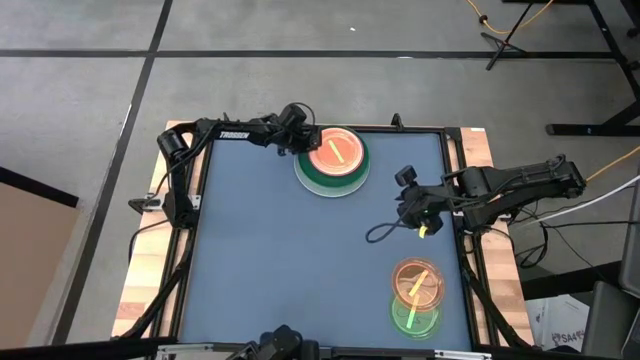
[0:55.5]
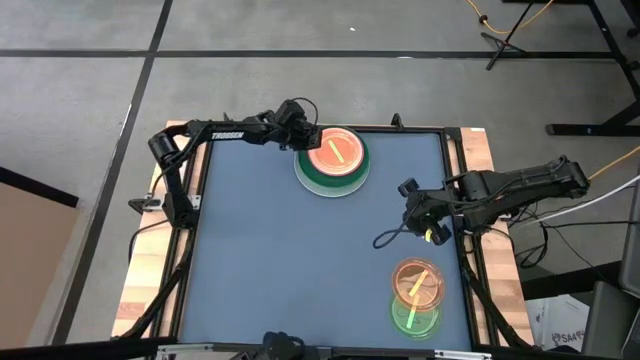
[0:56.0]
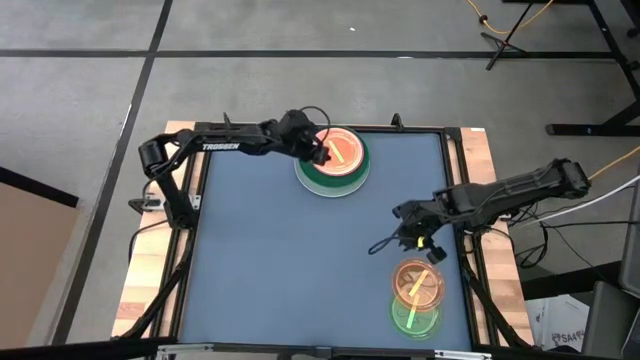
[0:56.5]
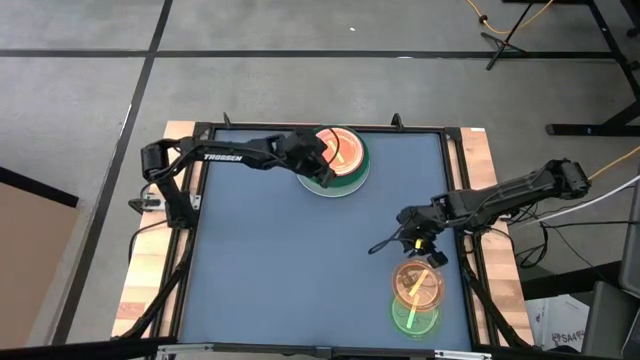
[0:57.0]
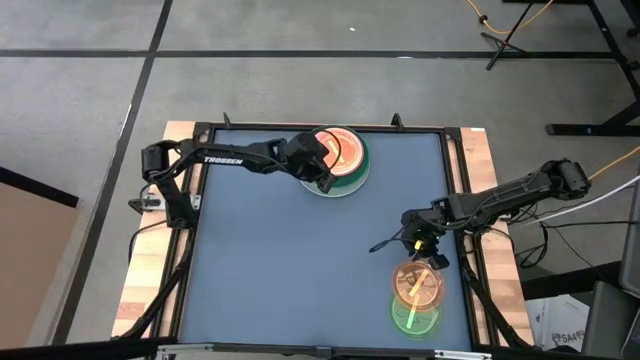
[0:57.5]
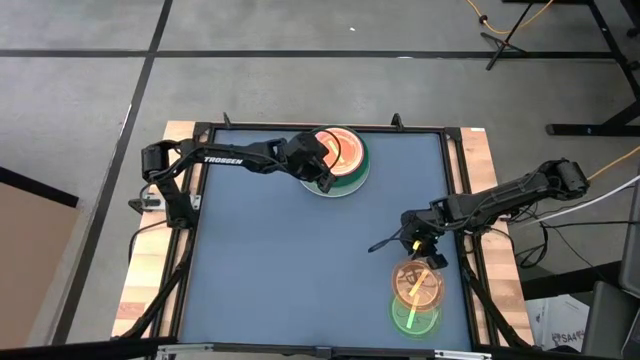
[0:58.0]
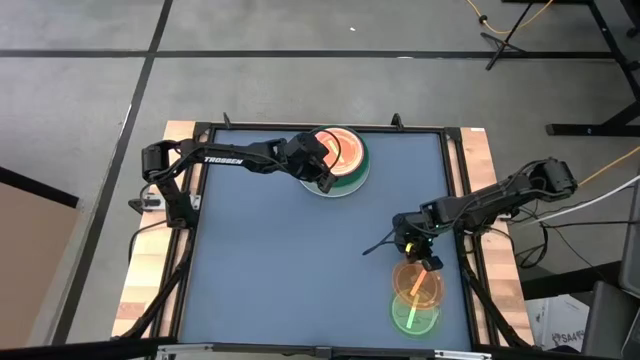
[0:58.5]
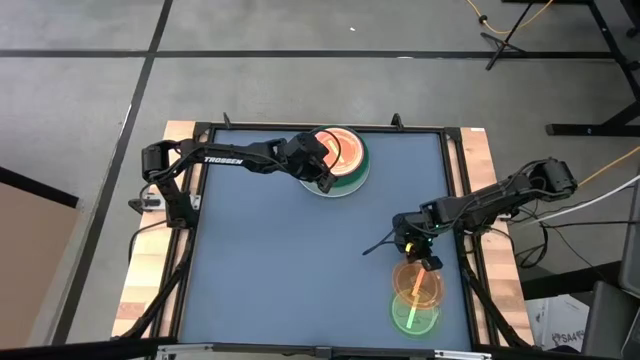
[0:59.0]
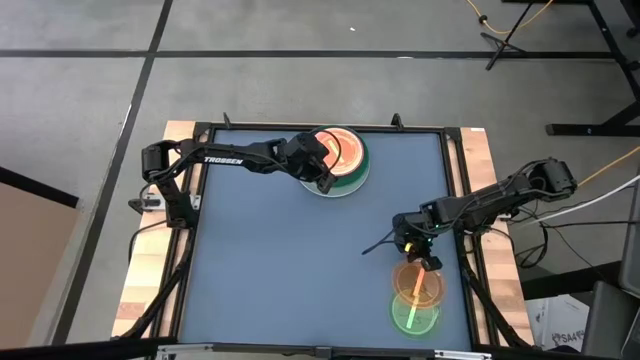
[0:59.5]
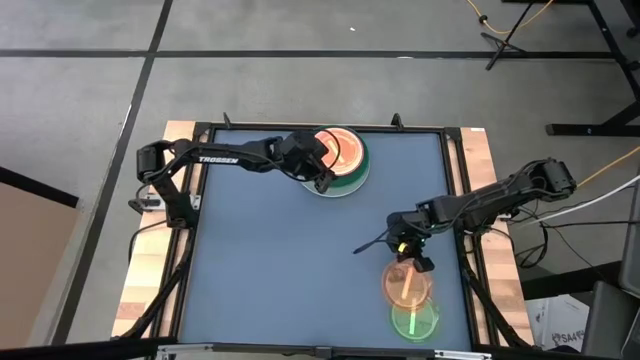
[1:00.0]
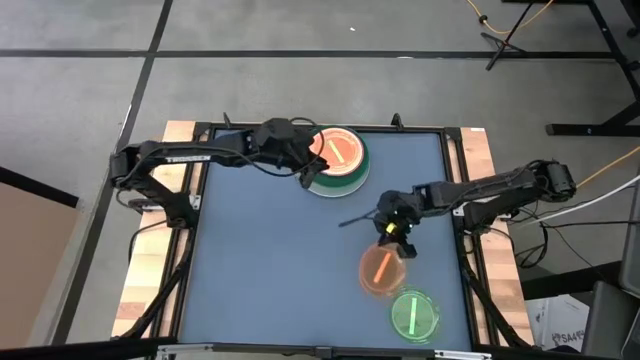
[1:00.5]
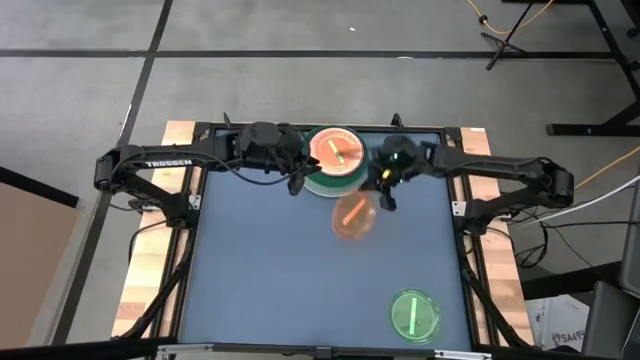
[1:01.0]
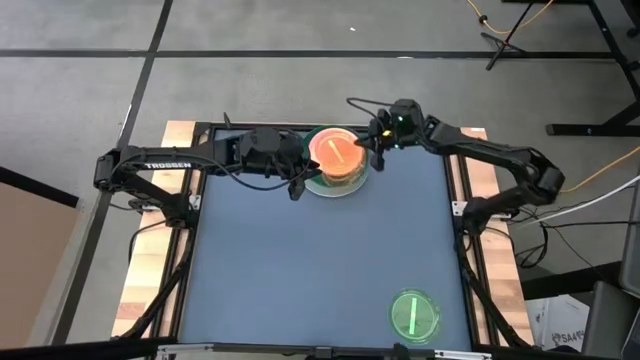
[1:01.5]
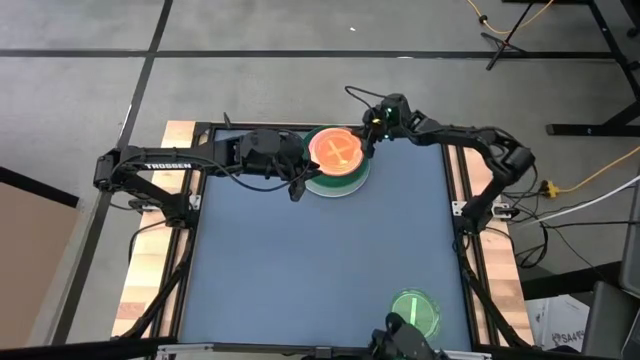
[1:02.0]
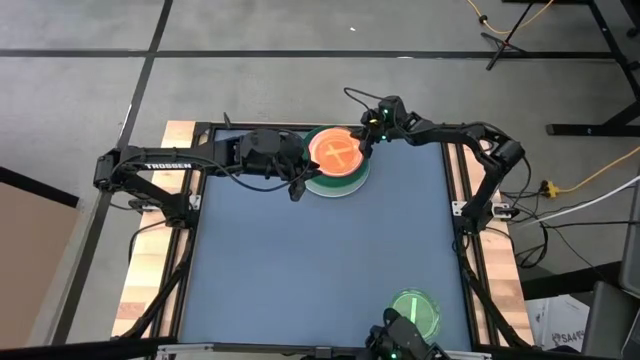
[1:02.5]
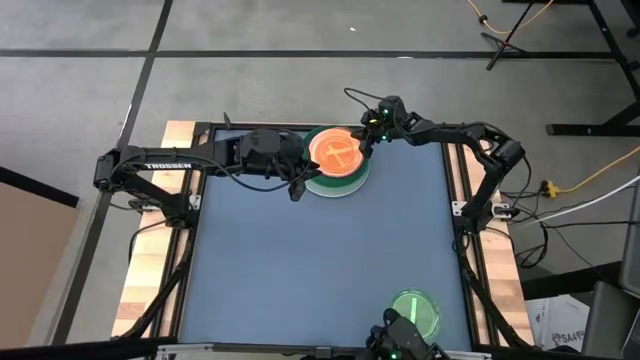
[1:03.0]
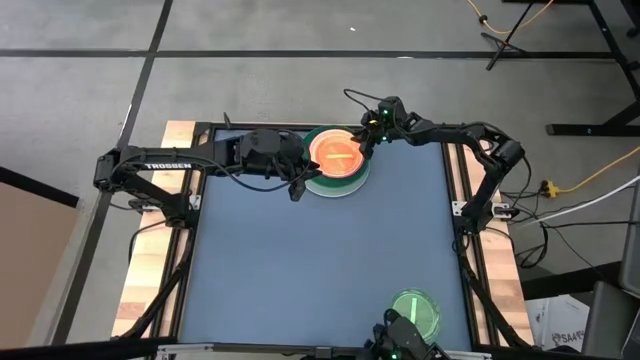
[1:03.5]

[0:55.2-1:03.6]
Task: Stack plastic plates
Stack the orange plate on top of the light green plate

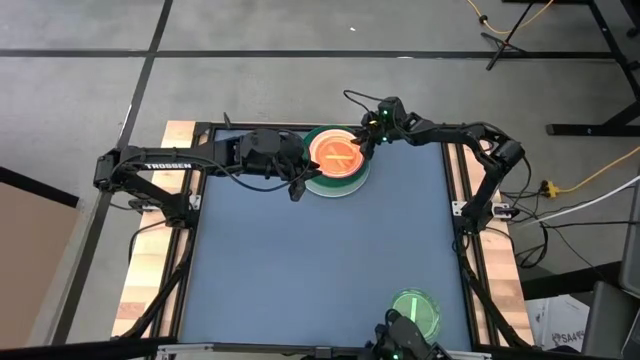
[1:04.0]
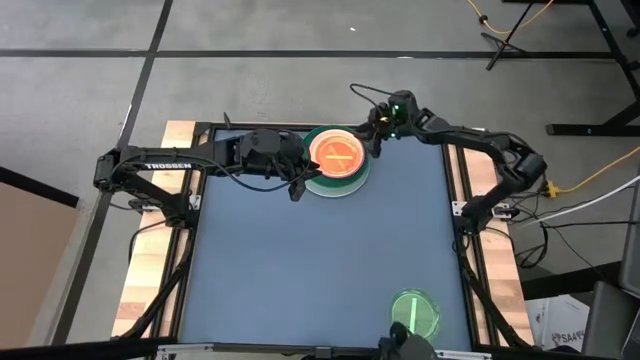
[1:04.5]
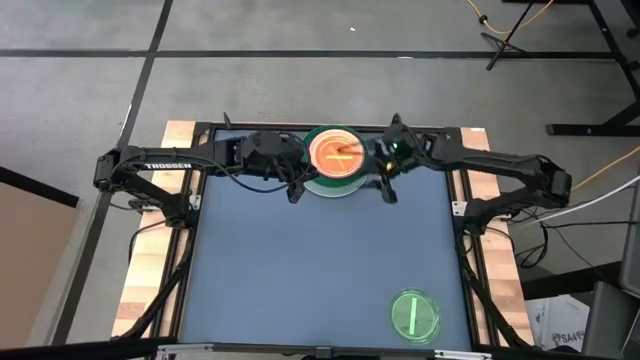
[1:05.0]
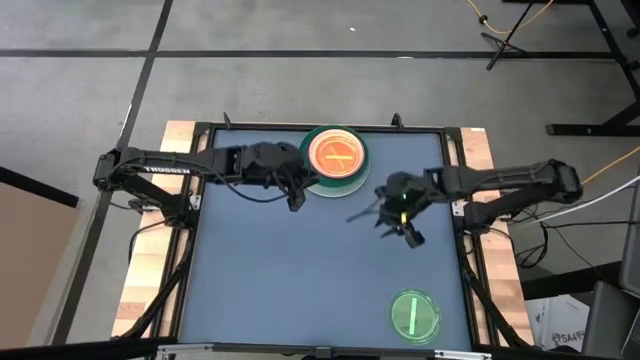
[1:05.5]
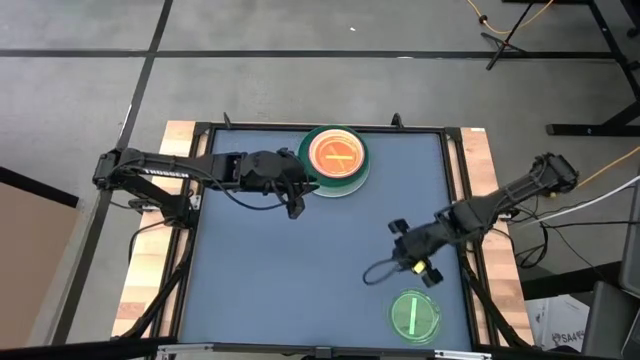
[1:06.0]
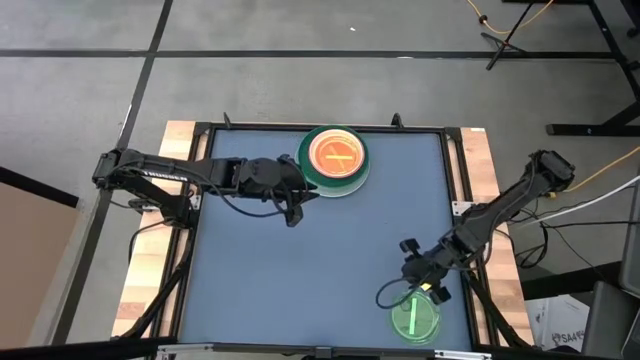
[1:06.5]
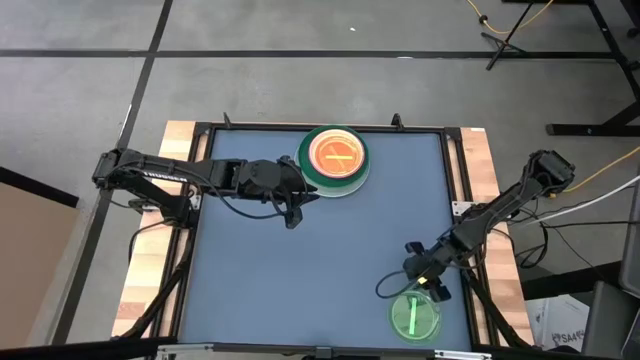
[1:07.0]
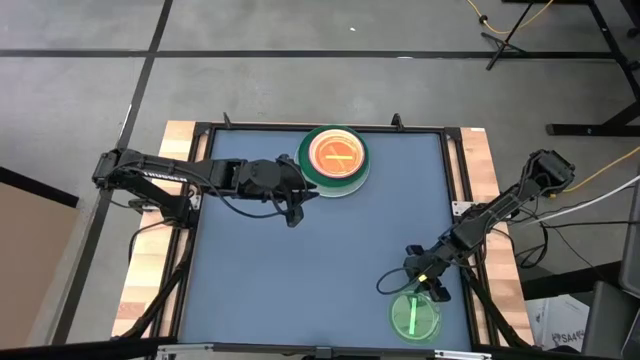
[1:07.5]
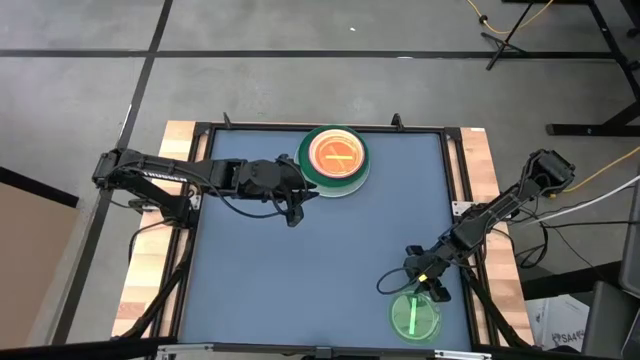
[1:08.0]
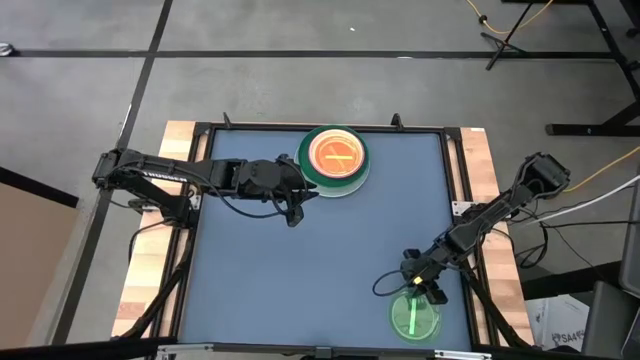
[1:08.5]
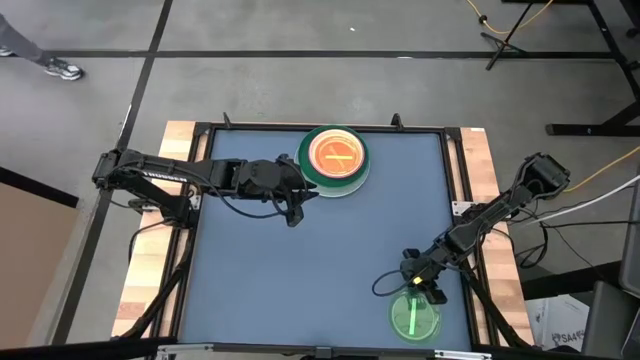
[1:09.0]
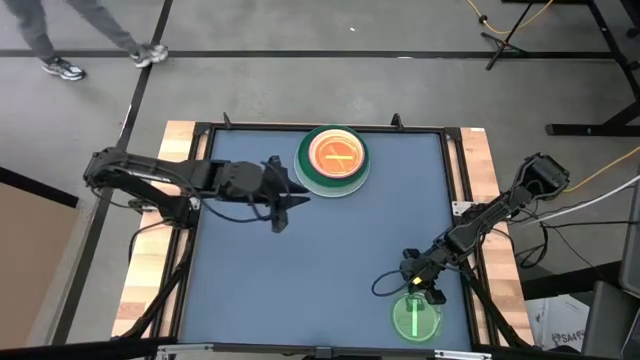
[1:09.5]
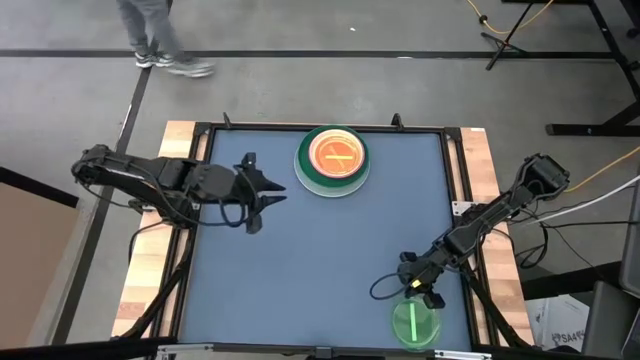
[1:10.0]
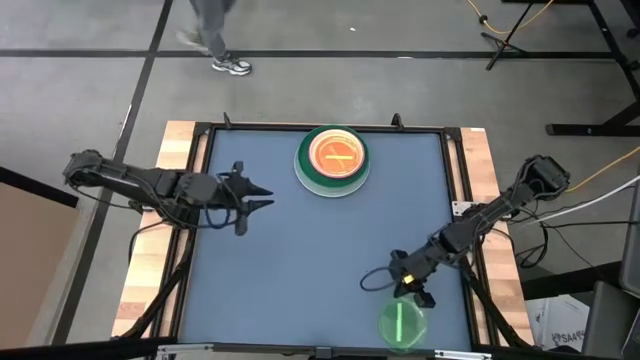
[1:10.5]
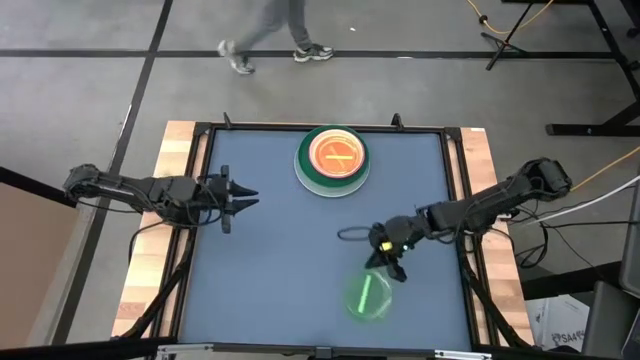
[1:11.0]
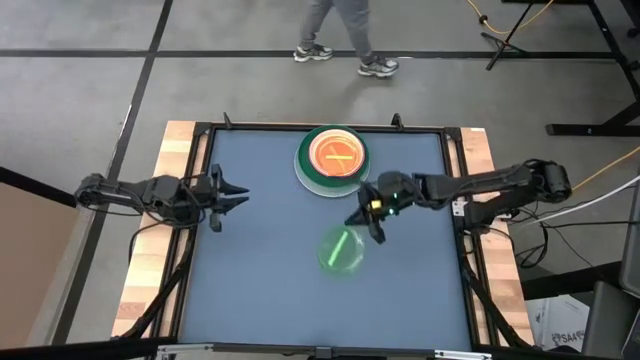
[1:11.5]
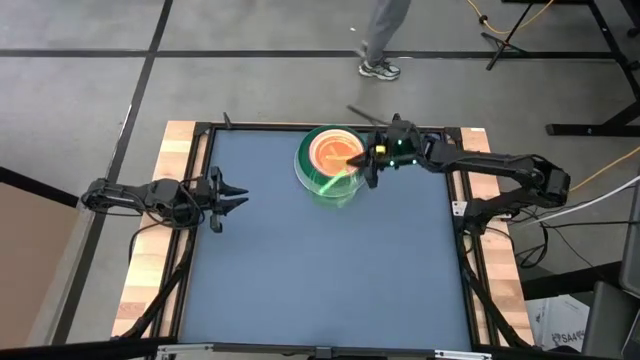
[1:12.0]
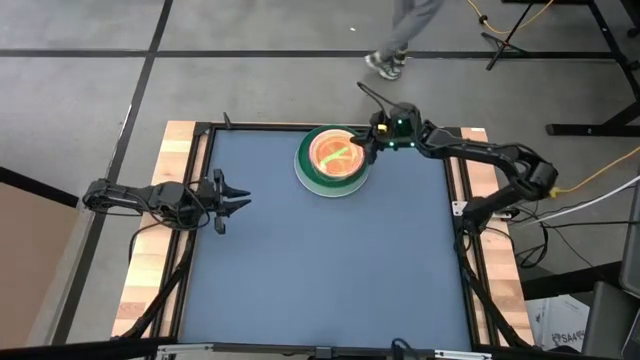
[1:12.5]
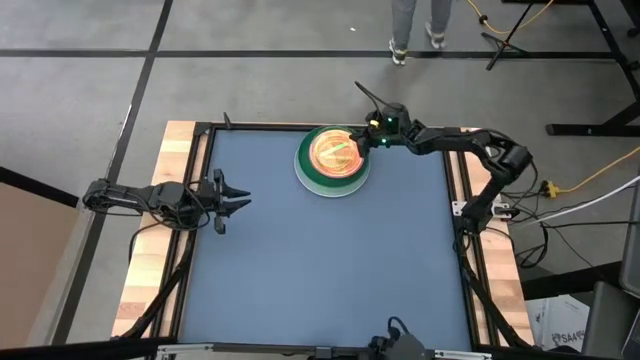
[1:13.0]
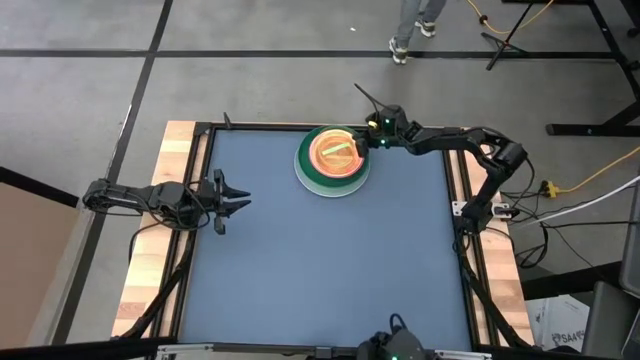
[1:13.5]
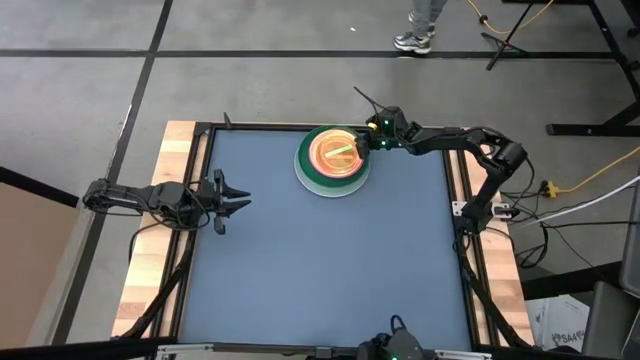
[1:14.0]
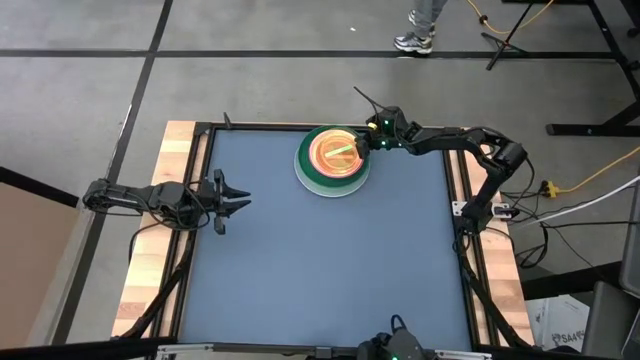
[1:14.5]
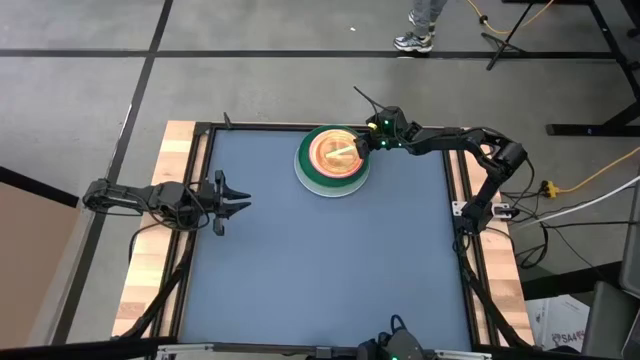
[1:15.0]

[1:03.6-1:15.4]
Stack the light green plate on top of the orange plate

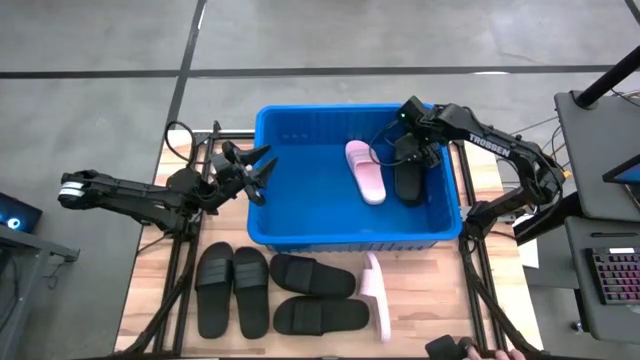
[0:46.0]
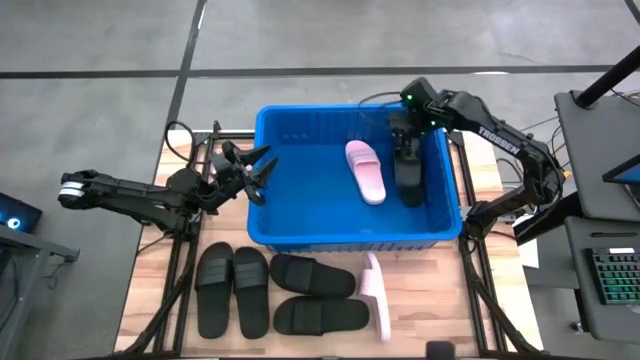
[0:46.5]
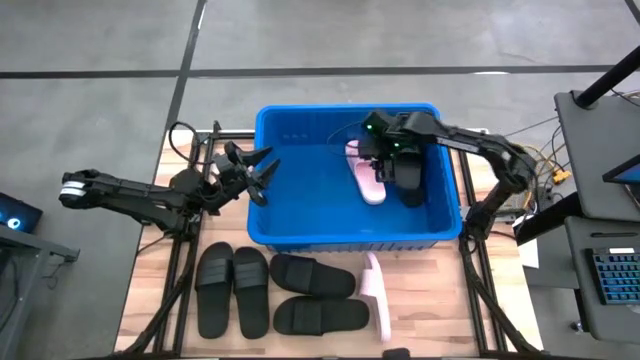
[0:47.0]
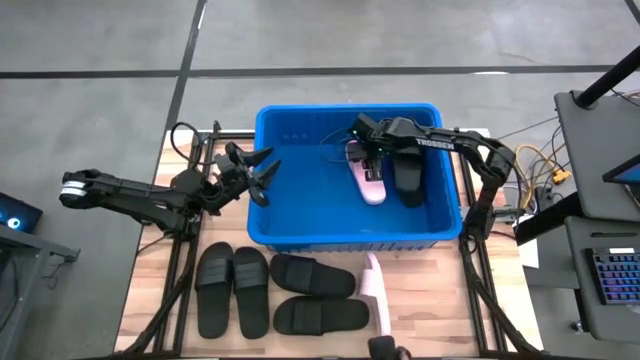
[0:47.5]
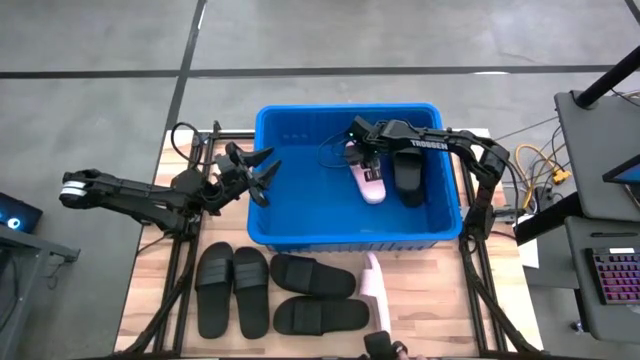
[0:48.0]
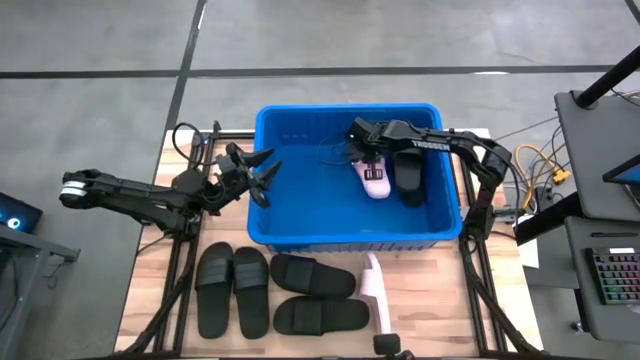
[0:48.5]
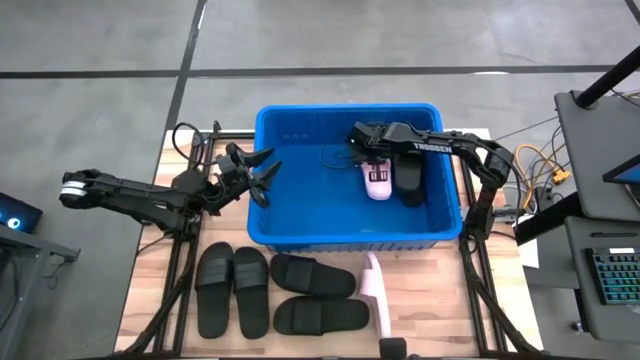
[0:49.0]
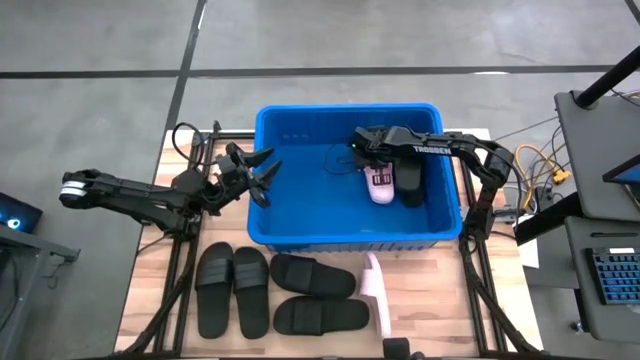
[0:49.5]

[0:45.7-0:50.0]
Task: Pick and place slides into bin
Adjust the pink slide in the blue container
